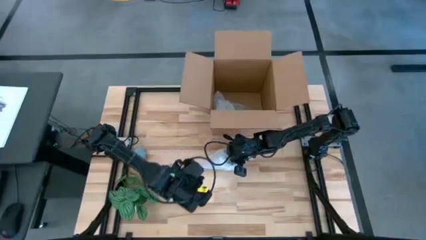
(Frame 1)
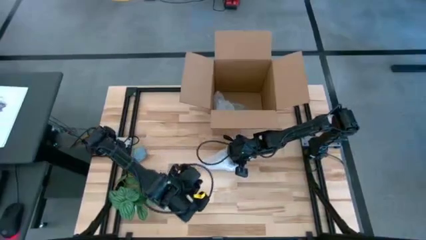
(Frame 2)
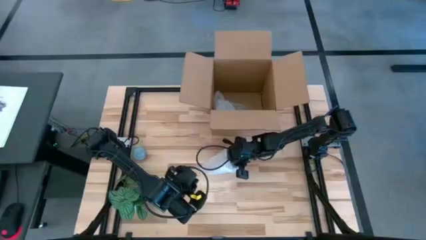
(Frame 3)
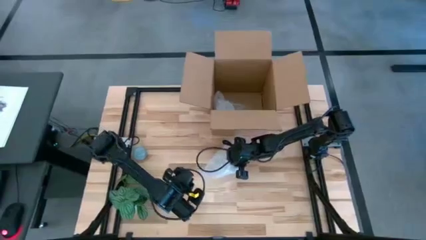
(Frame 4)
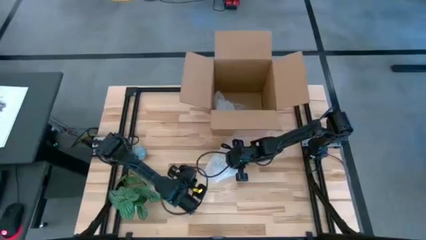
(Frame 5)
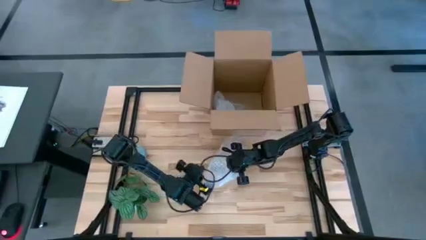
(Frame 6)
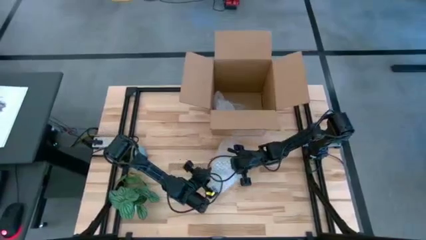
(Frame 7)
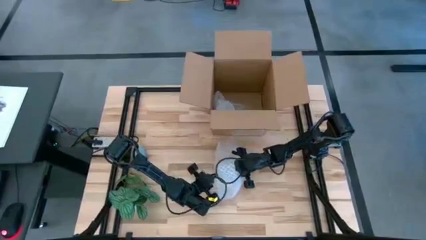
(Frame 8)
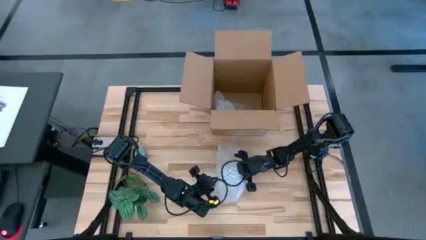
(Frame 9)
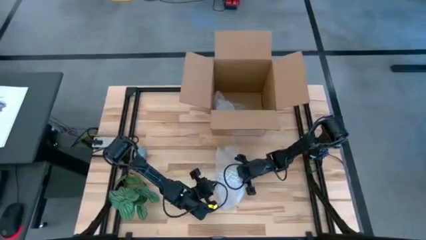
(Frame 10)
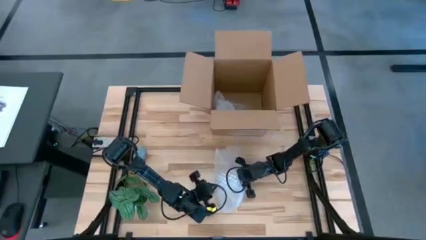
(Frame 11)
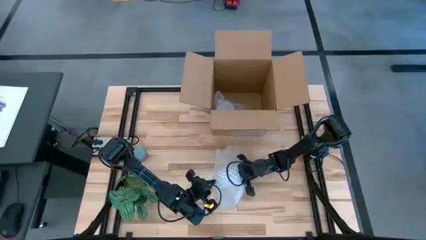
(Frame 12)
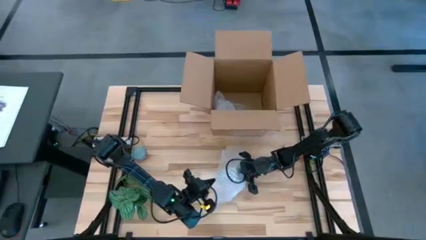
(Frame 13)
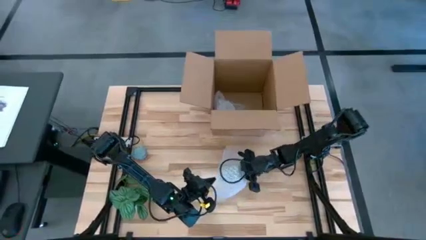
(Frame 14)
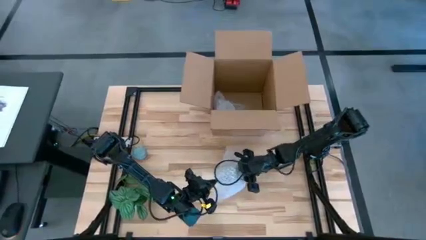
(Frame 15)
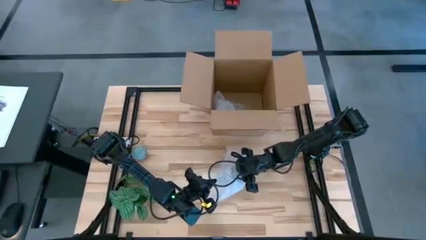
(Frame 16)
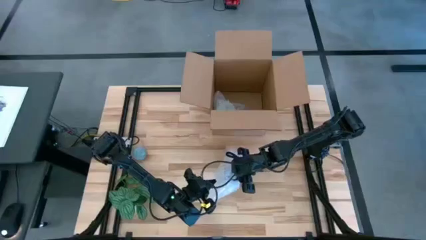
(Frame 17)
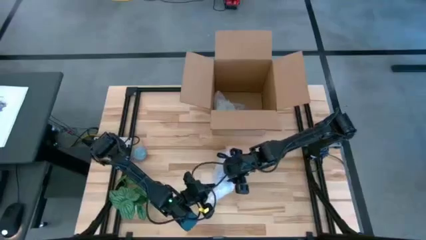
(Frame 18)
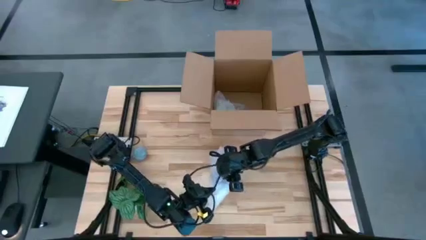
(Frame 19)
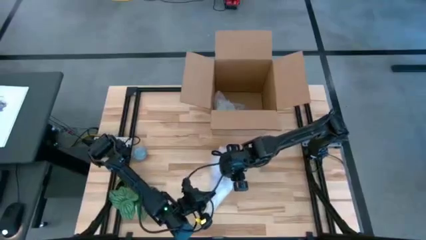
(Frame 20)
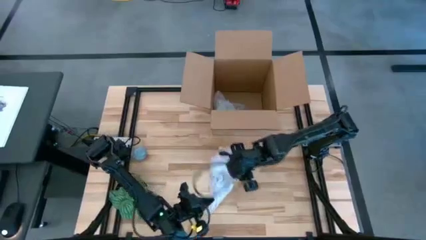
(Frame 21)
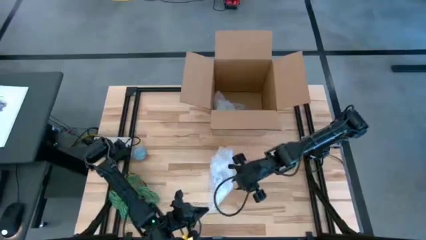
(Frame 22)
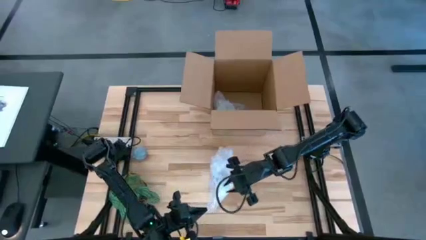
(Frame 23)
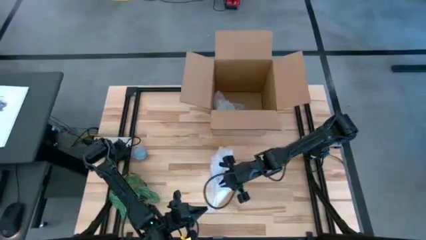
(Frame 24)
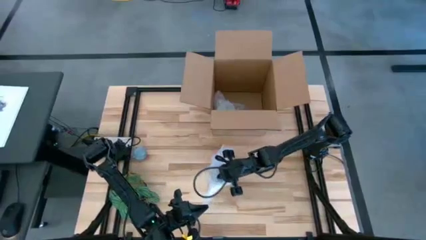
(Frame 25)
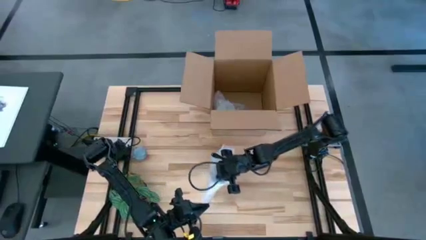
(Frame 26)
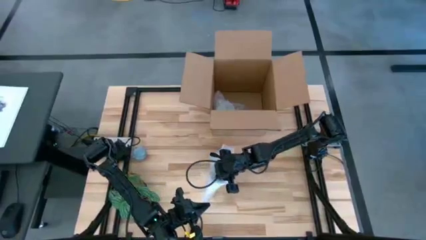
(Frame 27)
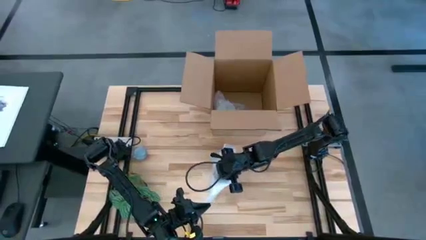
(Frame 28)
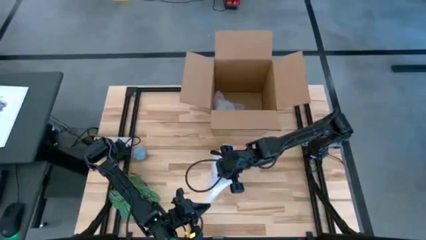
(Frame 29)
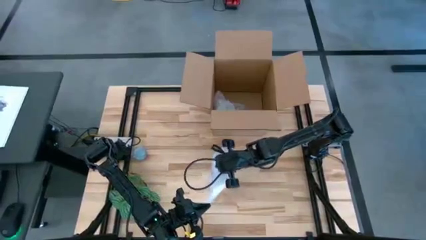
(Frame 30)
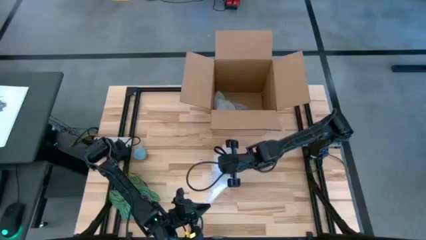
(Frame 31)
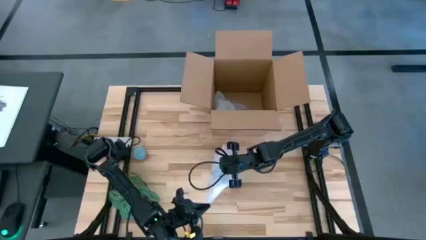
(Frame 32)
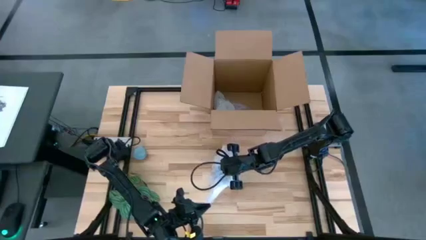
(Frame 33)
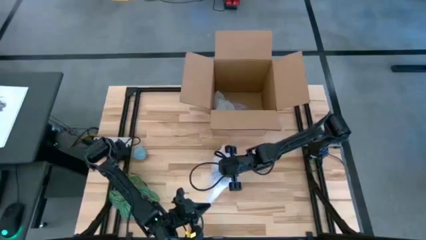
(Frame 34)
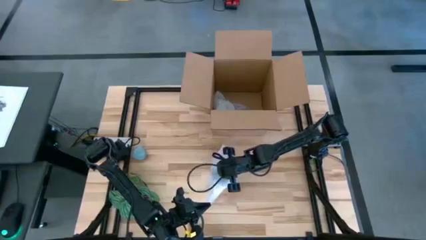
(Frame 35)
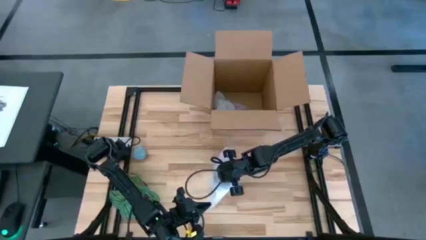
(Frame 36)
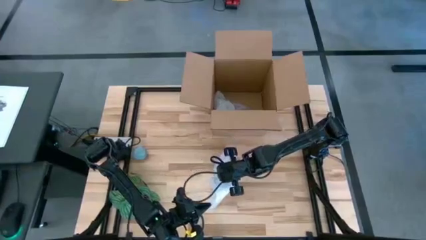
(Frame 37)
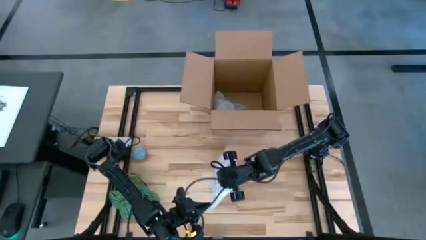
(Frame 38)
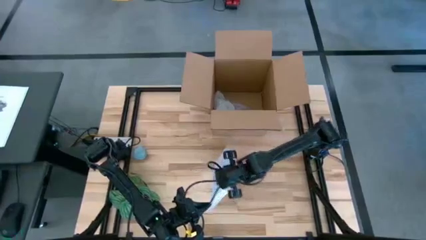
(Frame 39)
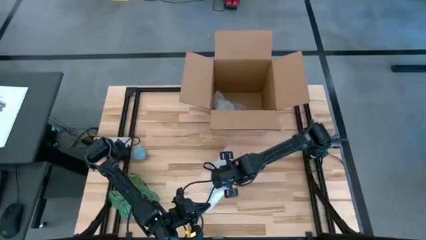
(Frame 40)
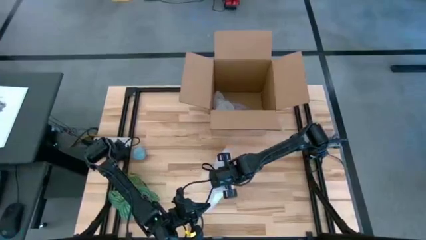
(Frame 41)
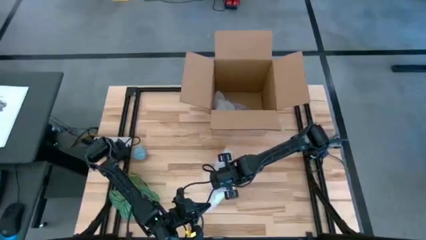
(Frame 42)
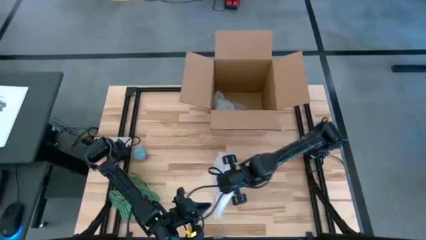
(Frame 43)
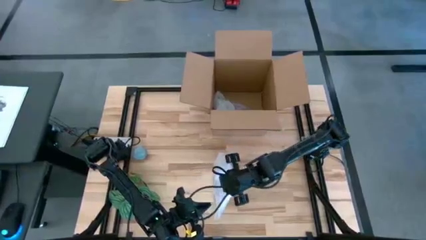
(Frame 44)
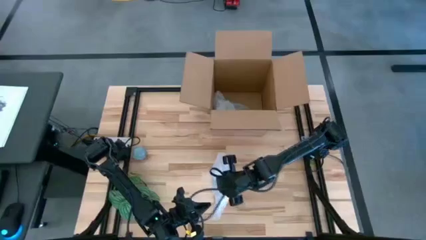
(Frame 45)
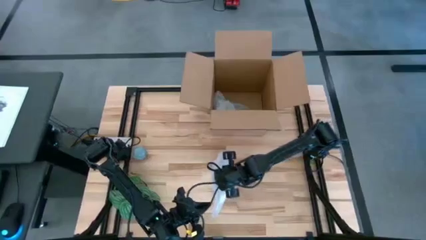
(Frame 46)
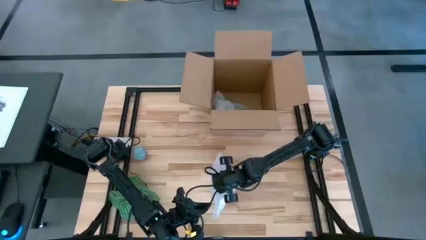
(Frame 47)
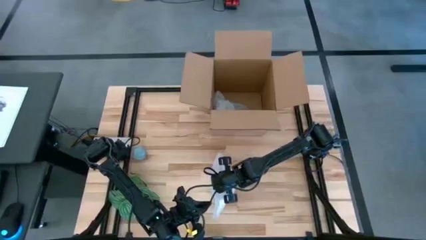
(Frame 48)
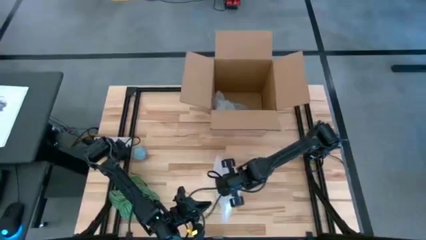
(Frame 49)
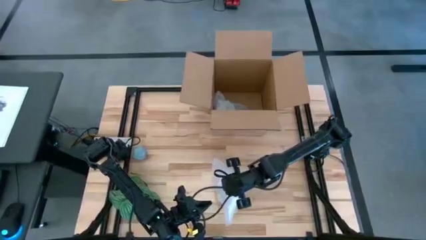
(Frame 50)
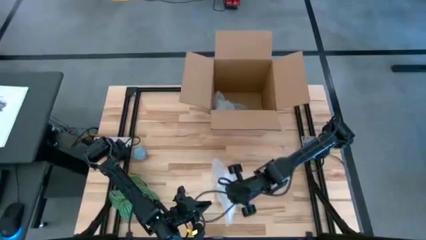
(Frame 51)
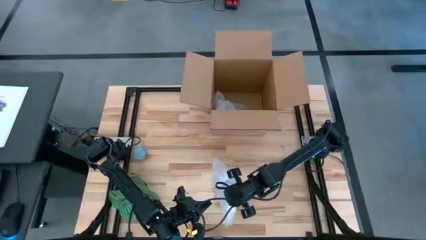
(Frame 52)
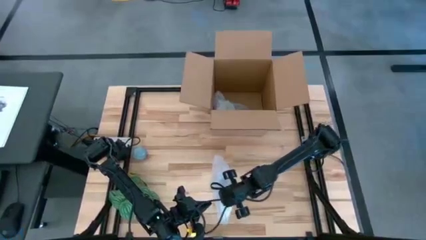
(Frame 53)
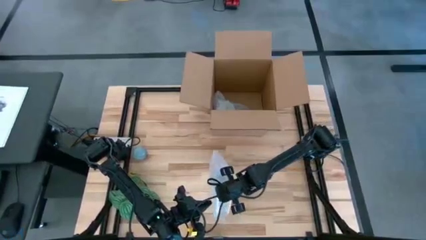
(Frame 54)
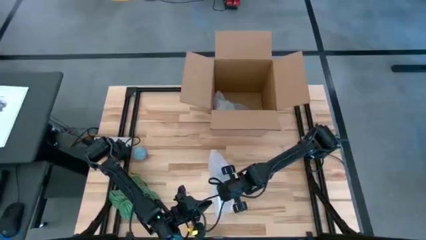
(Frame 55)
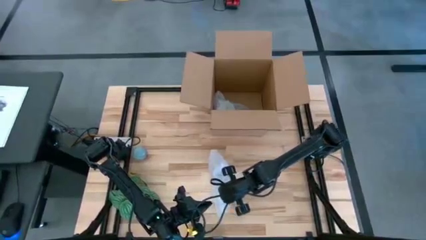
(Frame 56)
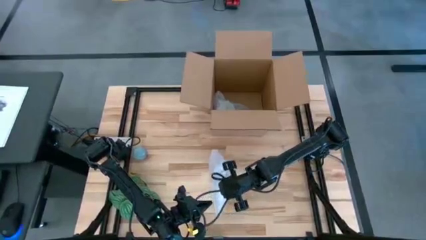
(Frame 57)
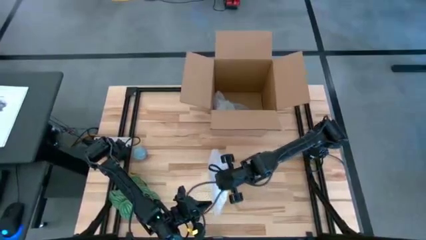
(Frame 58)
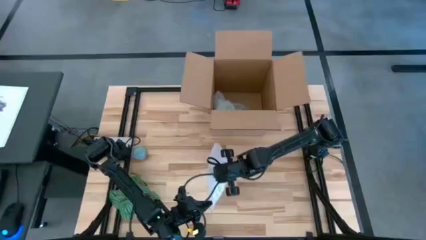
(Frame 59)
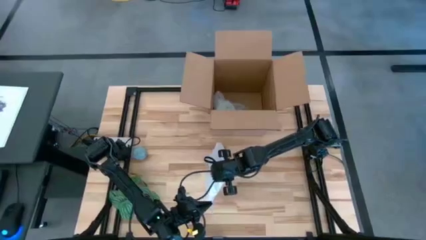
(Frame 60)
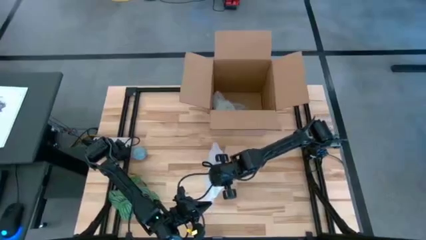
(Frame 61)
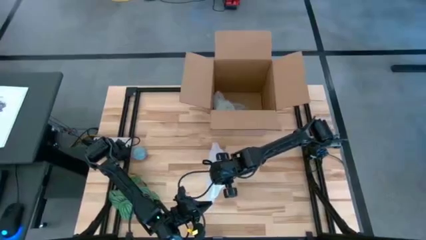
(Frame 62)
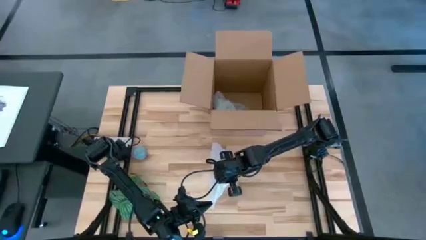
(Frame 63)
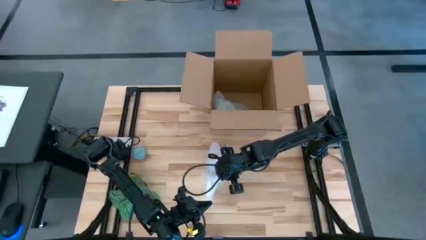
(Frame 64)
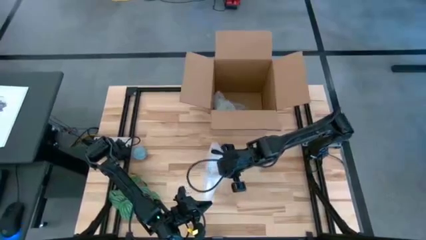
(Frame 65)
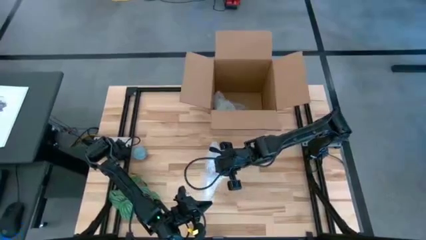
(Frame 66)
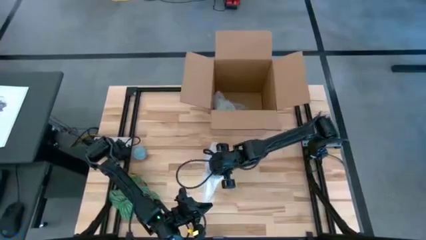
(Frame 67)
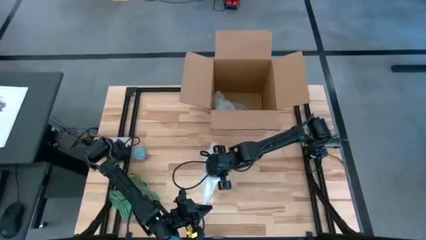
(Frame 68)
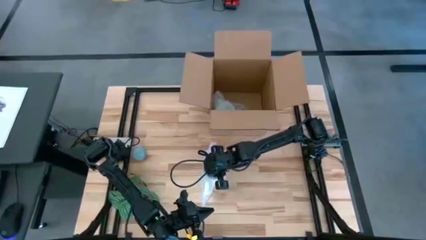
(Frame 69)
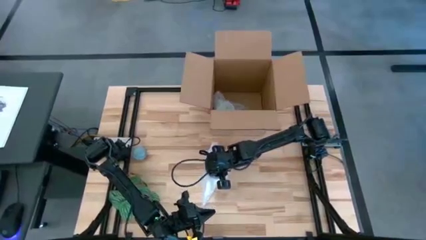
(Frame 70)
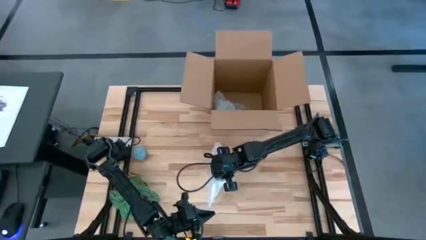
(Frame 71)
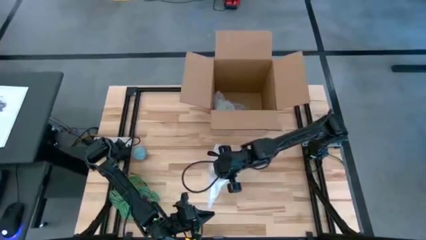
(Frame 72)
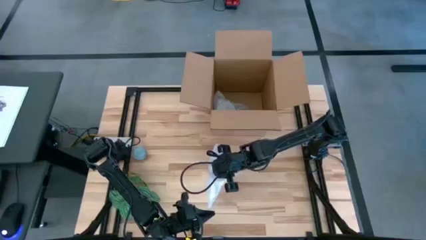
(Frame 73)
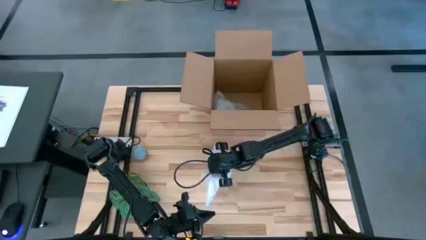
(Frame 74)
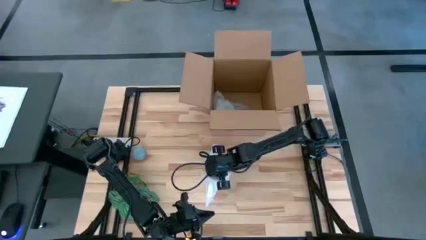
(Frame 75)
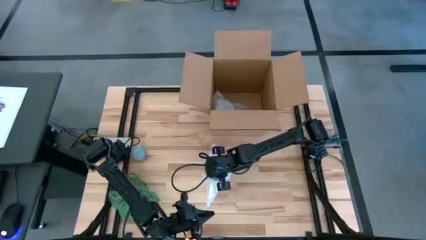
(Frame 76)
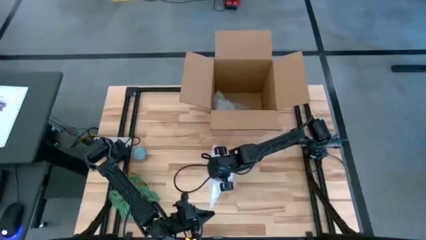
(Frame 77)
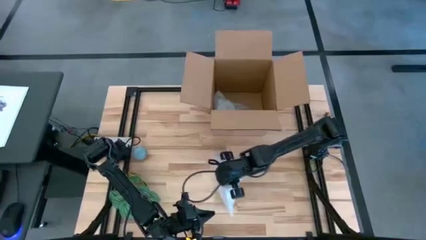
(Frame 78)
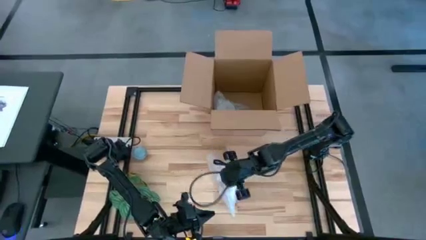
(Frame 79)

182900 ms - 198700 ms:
Task: wrap mug
Wrap the white gray mug with bubble wrap
